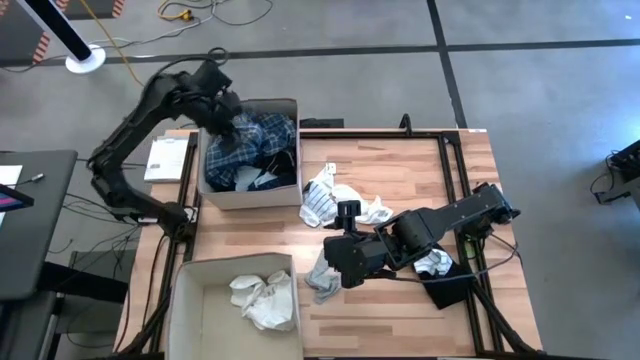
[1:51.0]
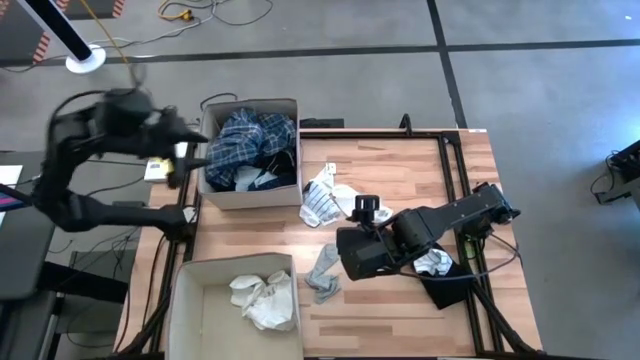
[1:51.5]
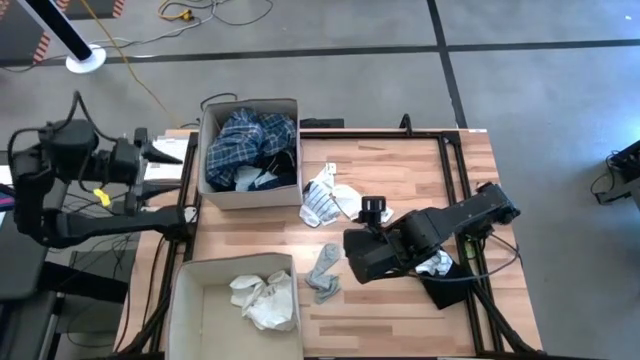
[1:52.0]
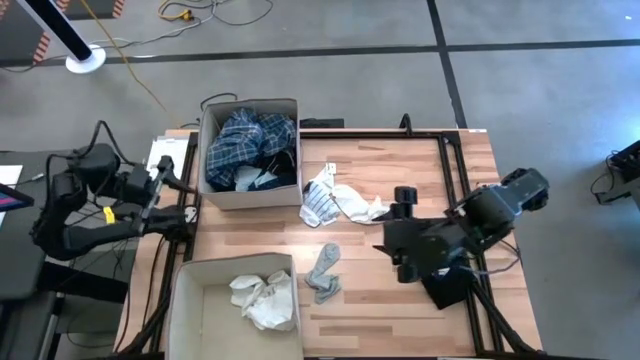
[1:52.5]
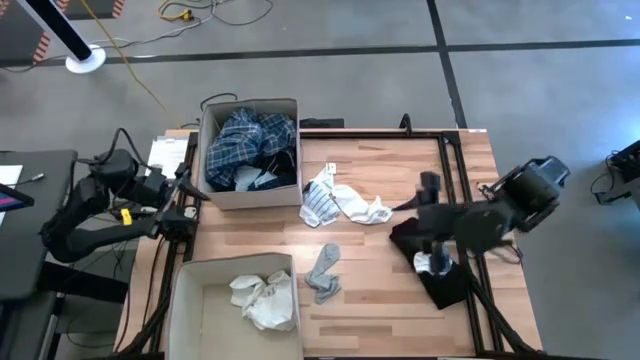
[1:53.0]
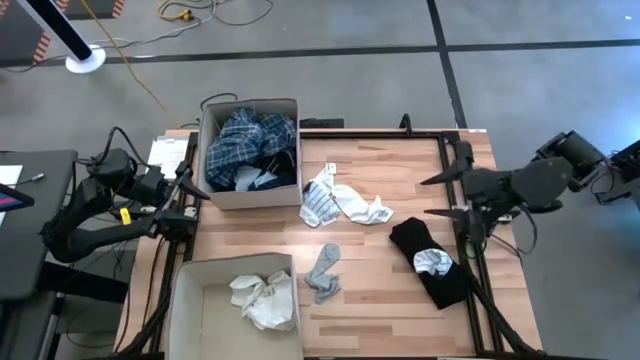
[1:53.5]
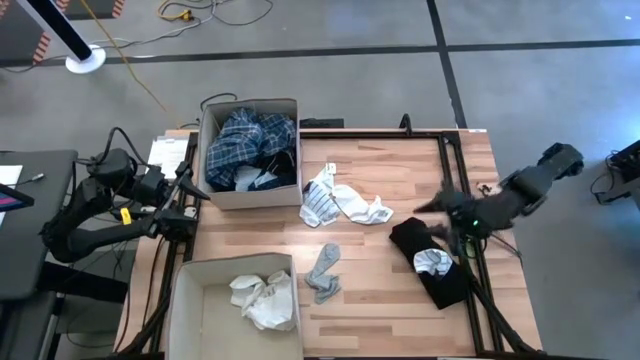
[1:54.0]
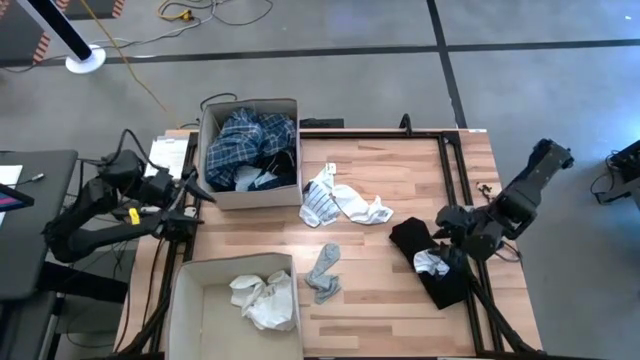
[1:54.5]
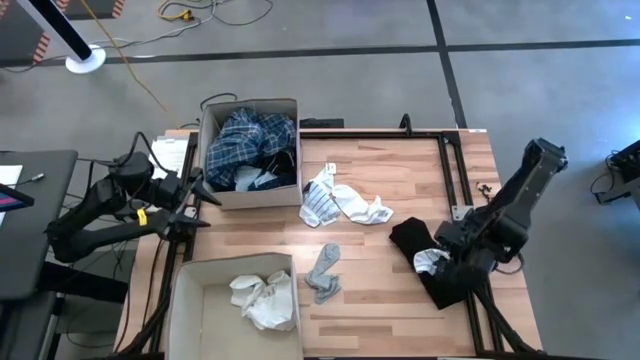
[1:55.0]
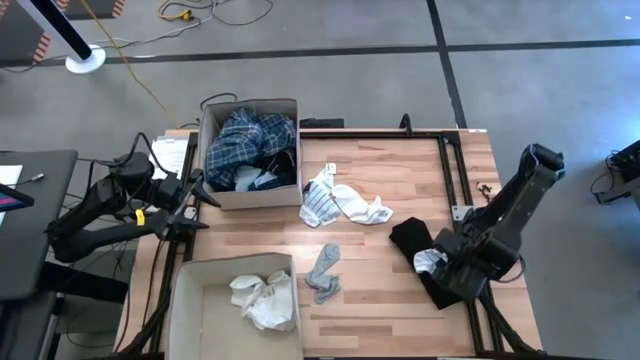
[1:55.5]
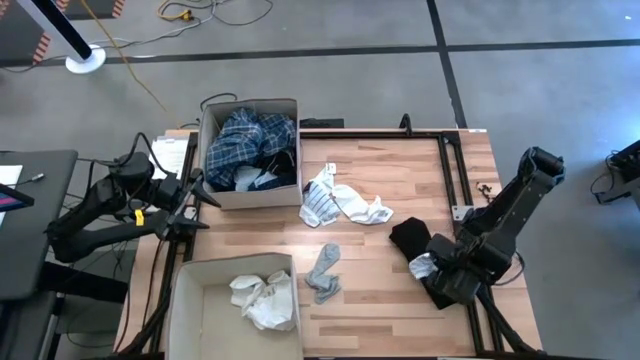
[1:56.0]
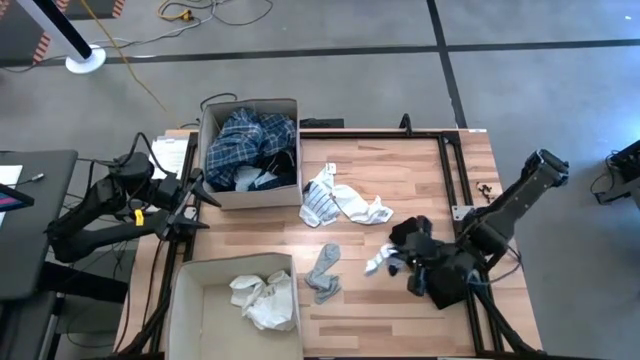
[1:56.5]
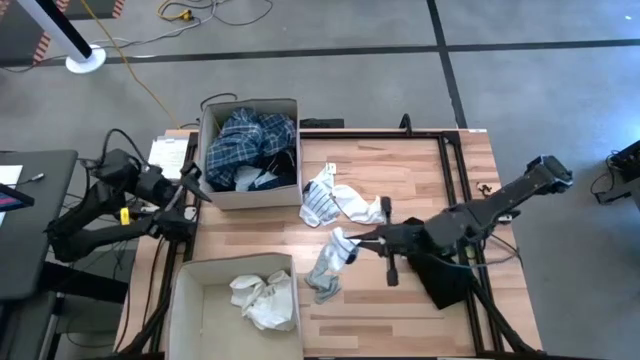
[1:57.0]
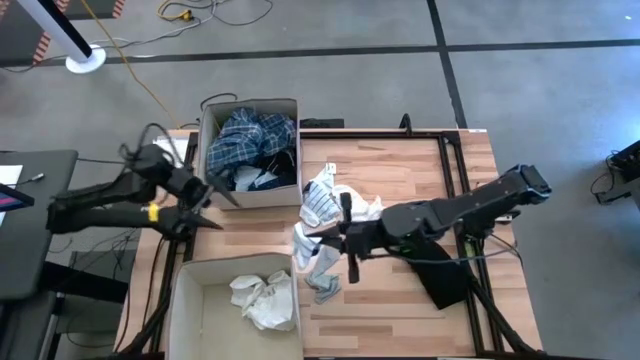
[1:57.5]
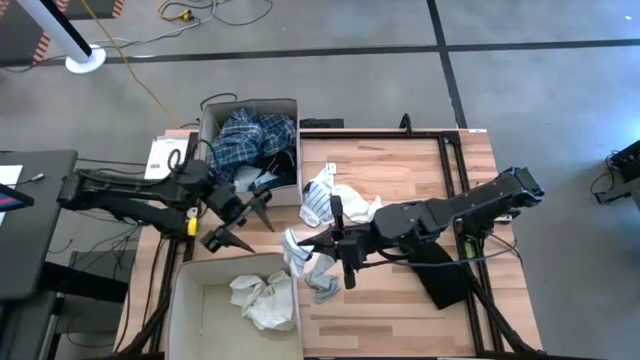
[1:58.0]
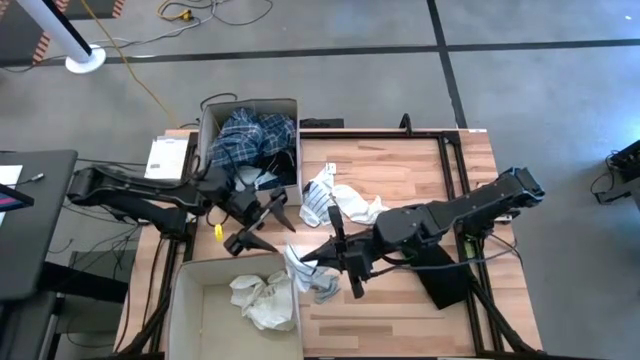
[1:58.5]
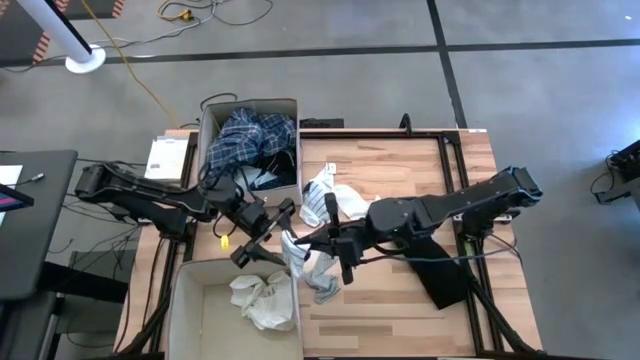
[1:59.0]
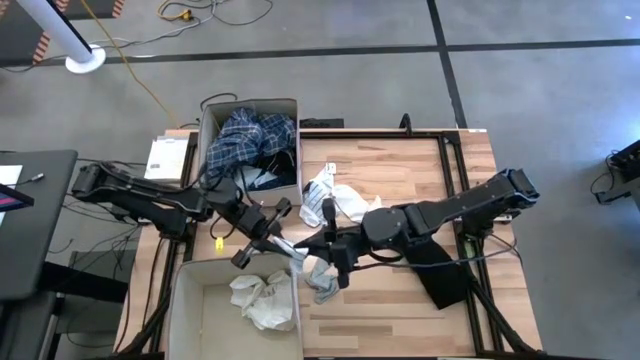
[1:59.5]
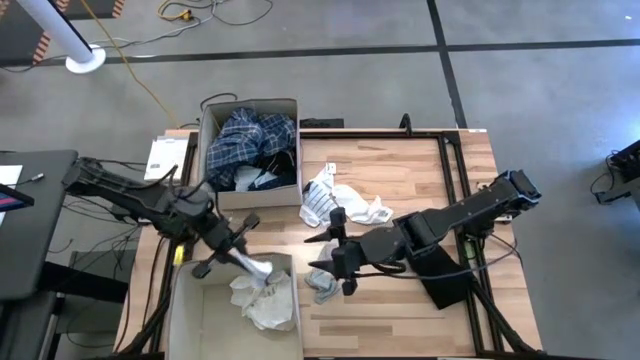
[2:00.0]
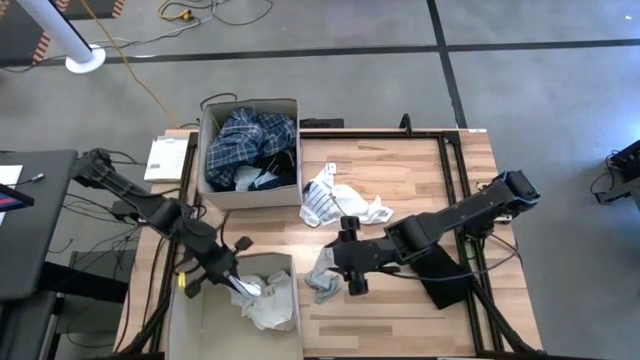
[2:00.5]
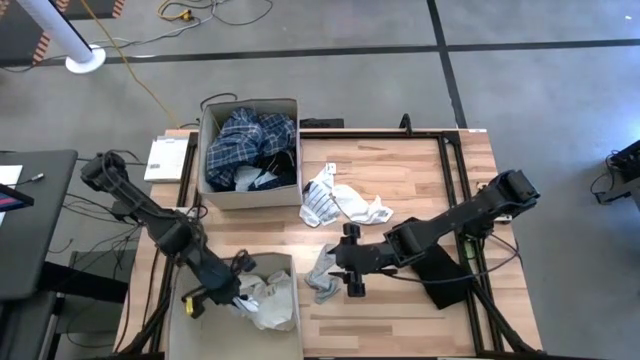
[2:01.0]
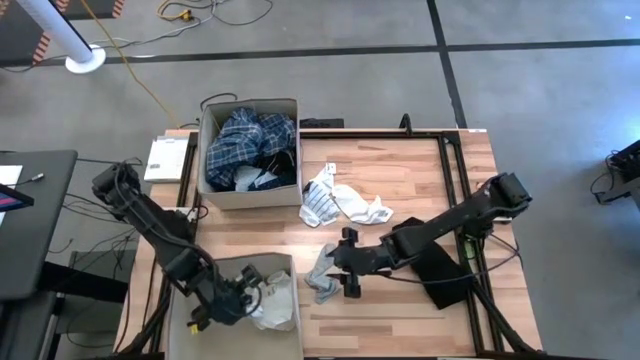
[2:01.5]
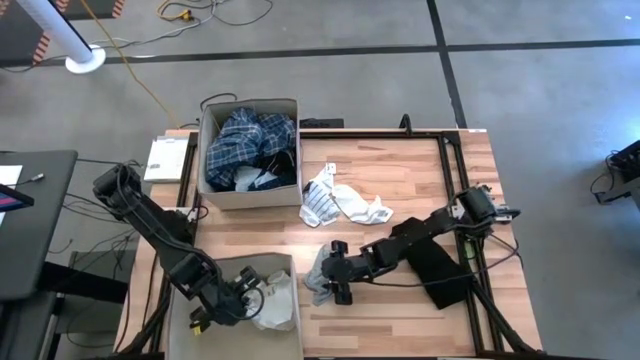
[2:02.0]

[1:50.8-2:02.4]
Task: Sort clothes
Put the right white striped sock into the bottom light brown laundry organizer

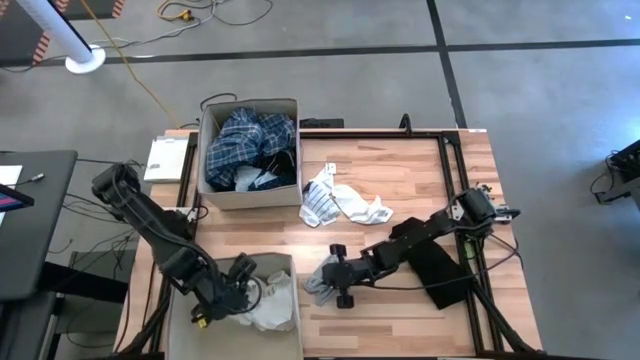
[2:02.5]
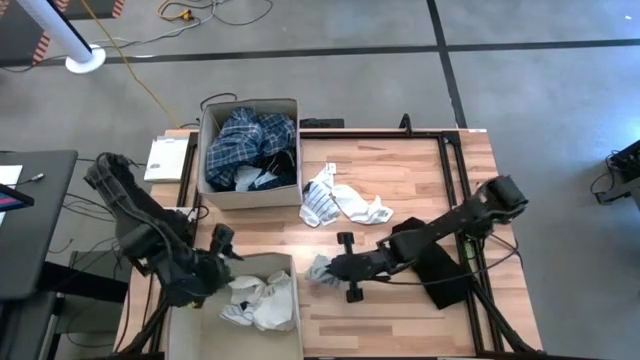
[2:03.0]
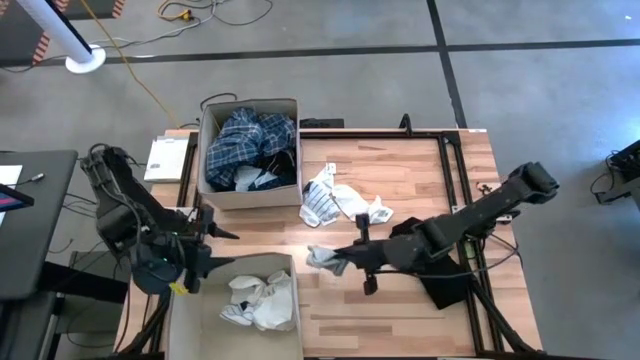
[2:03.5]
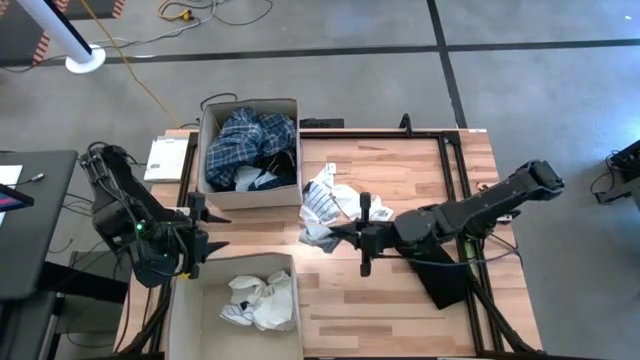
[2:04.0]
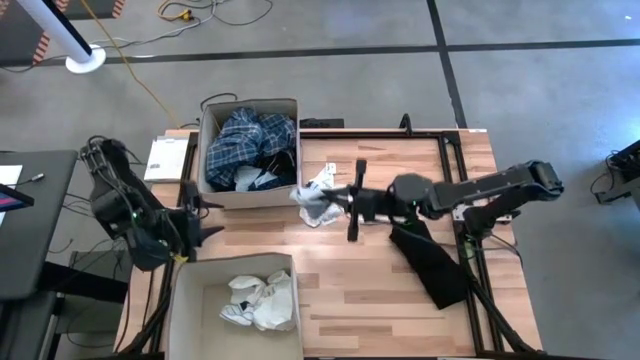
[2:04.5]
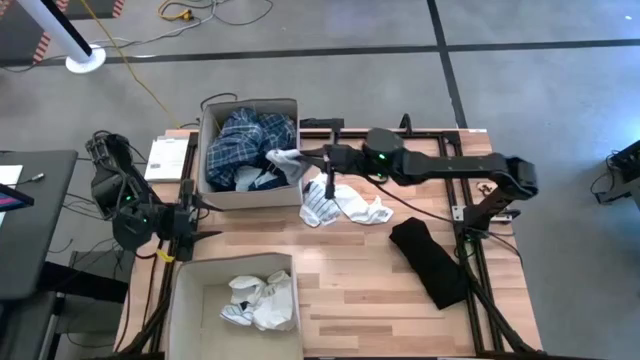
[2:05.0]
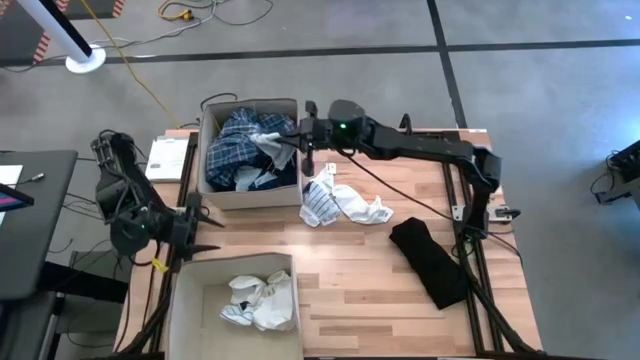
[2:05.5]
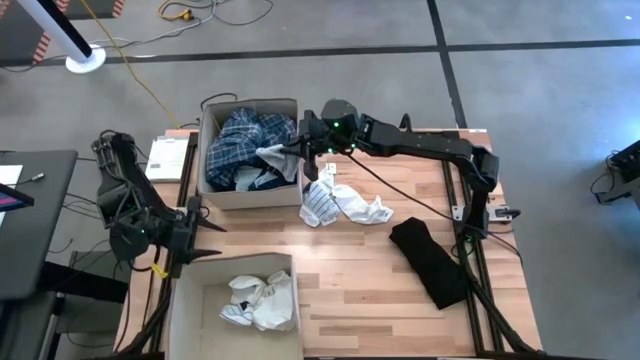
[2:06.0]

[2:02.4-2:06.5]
Put the gray sock into the top light brown laundry organizer

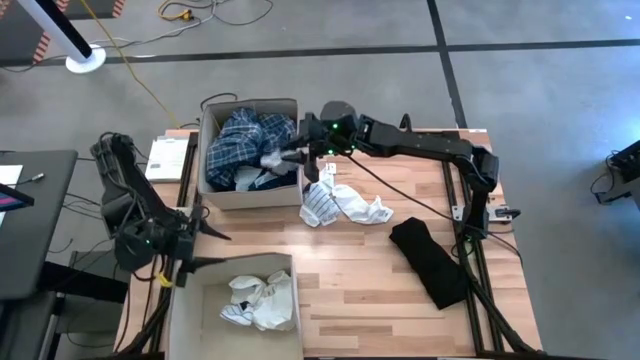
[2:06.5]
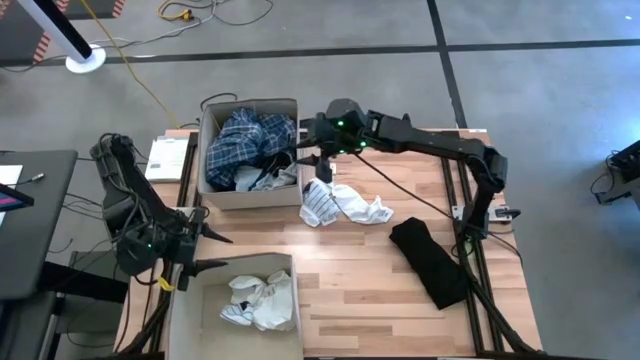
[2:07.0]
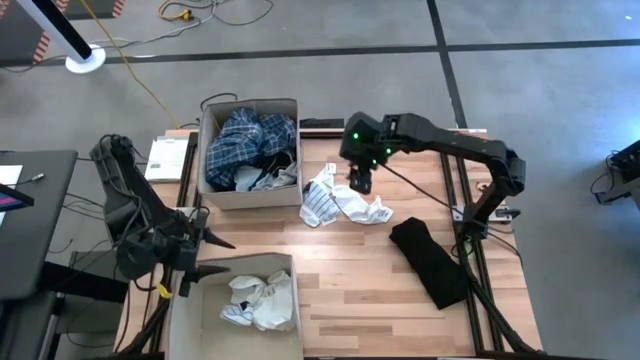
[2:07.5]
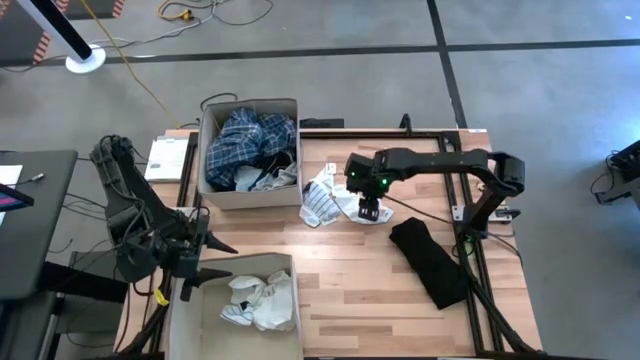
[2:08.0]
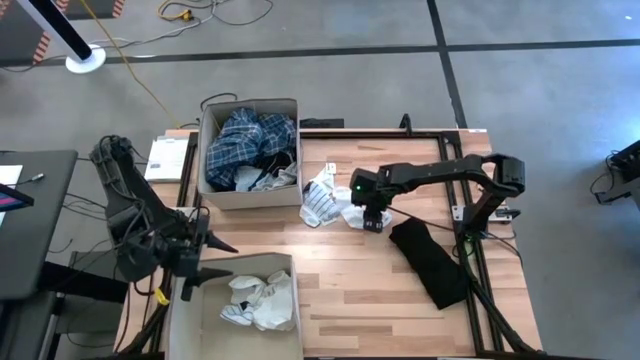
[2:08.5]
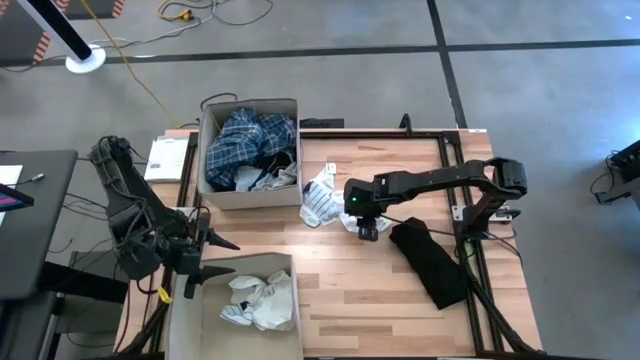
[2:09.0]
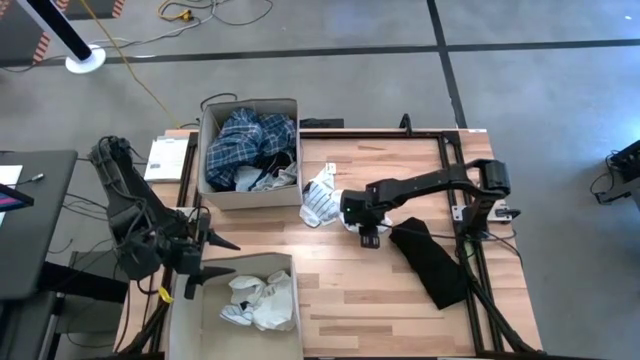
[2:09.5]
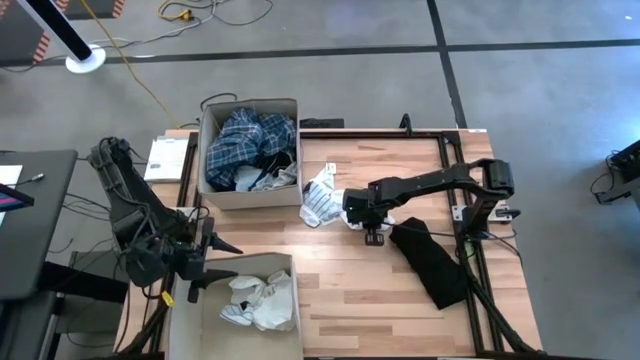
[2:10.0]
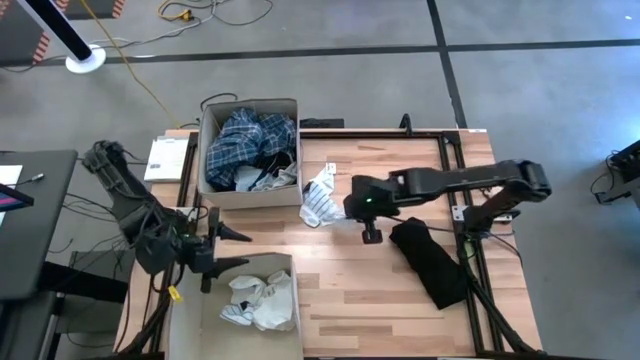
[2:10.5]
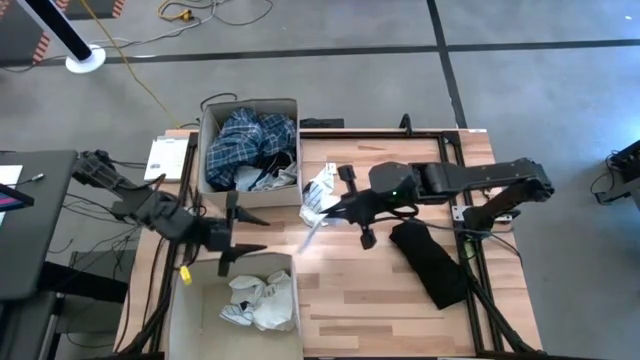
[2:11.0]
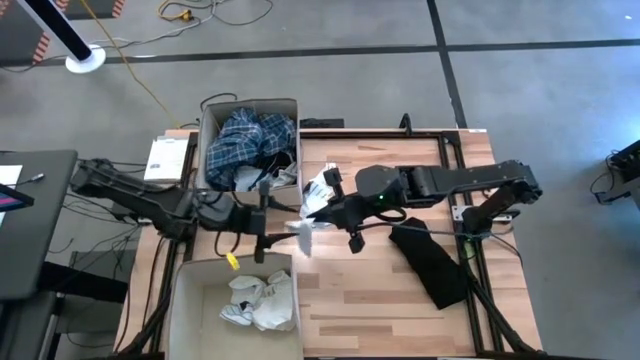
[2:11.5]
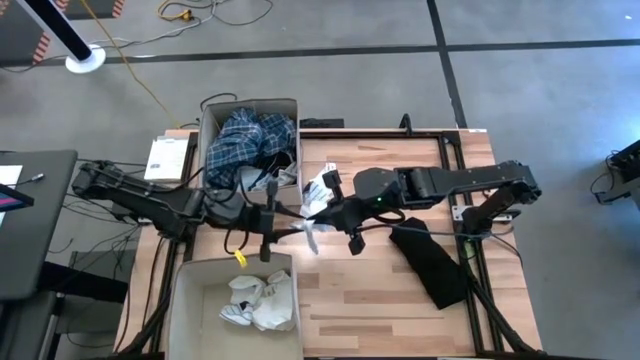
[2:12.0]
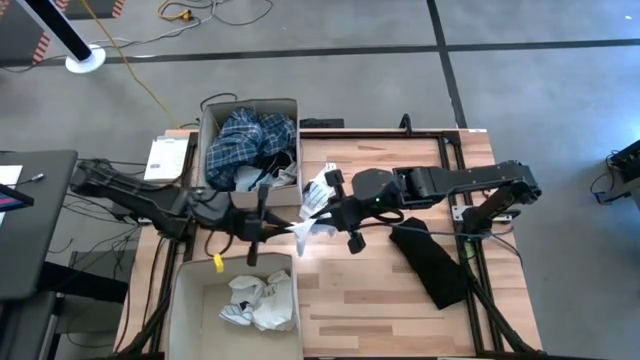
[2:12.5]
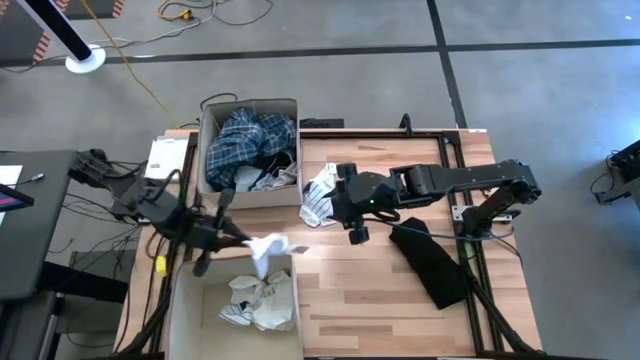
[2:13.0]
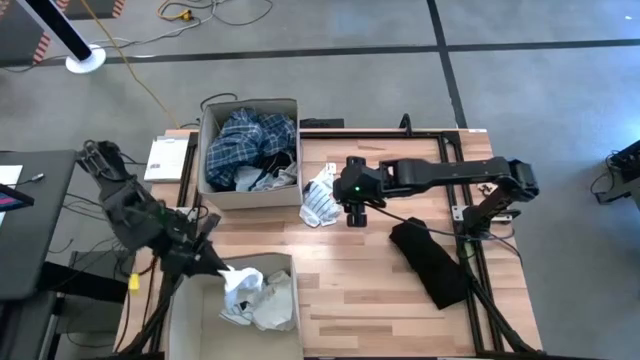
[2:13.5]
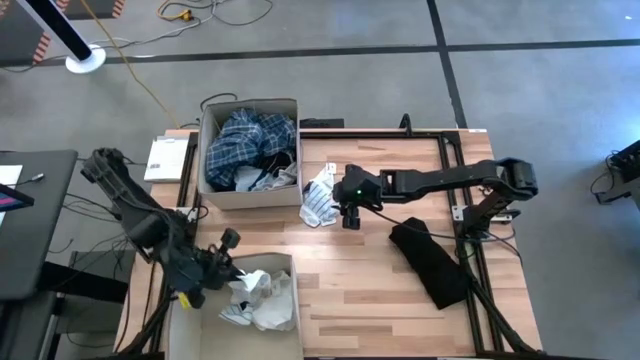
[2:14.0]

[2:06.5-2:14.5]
Put the right white sock into the bottom light brown laundry organizer
